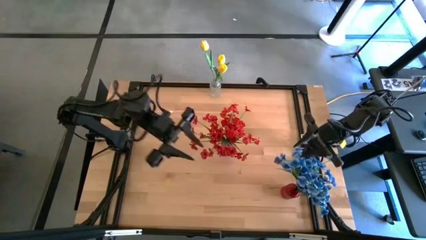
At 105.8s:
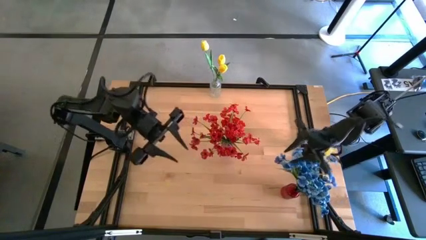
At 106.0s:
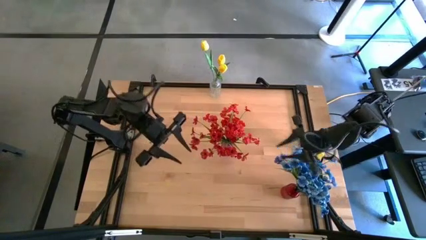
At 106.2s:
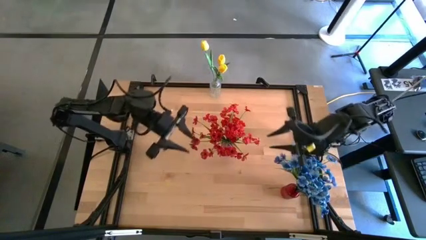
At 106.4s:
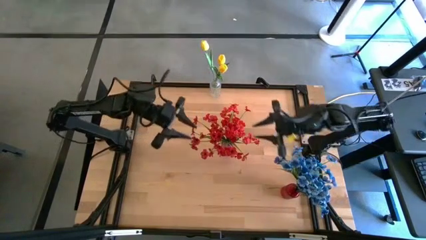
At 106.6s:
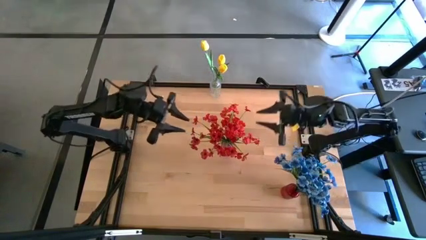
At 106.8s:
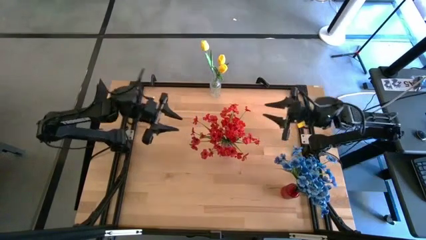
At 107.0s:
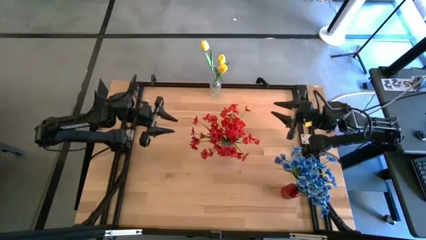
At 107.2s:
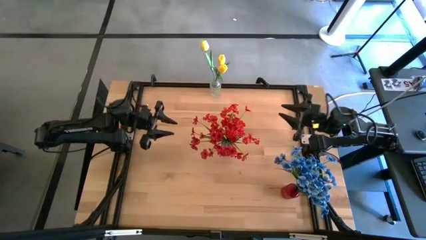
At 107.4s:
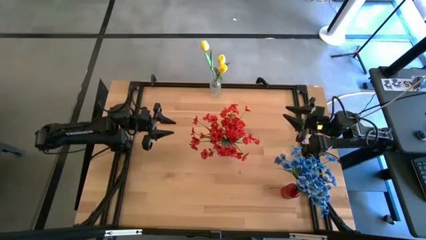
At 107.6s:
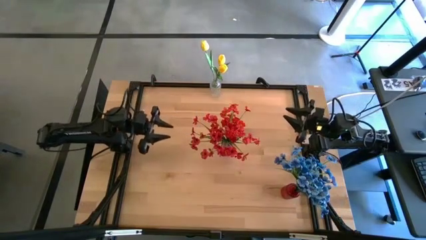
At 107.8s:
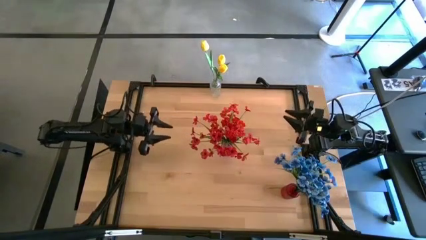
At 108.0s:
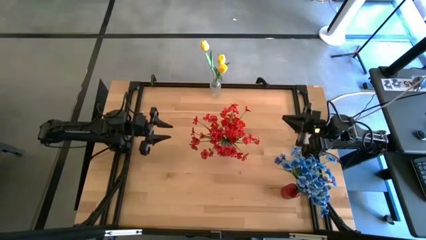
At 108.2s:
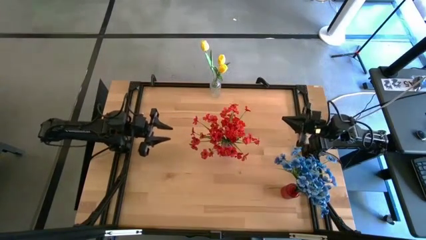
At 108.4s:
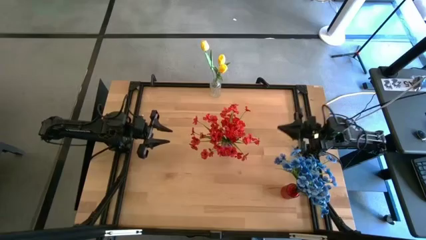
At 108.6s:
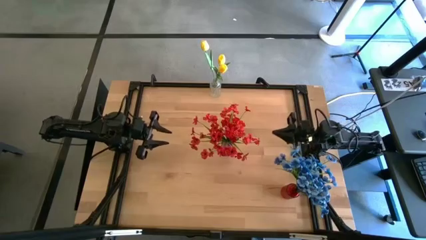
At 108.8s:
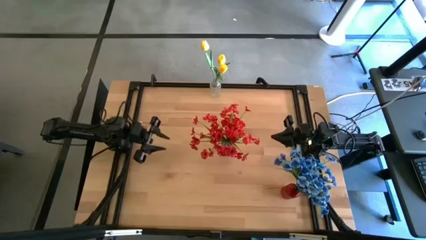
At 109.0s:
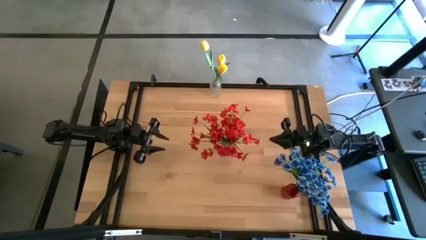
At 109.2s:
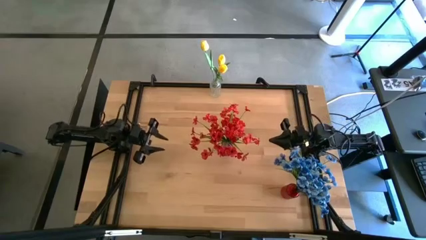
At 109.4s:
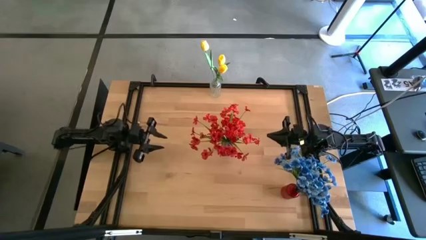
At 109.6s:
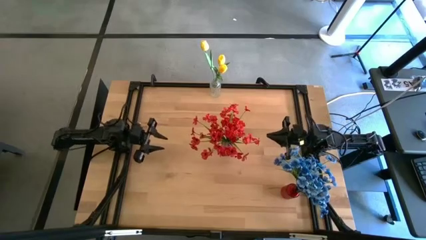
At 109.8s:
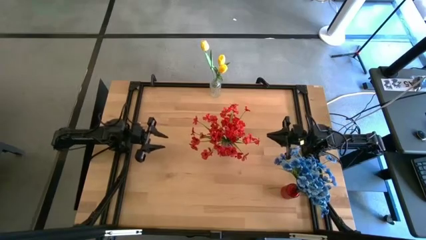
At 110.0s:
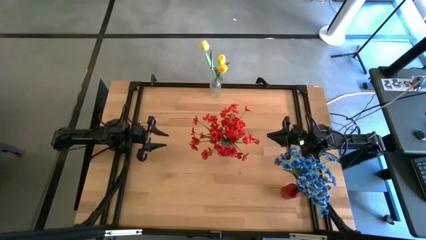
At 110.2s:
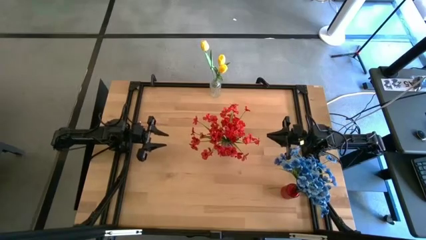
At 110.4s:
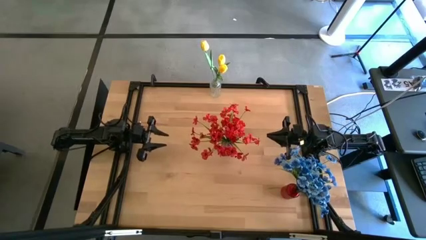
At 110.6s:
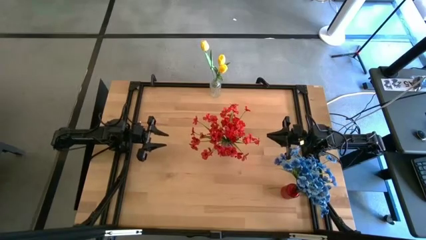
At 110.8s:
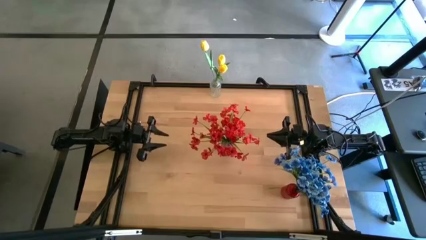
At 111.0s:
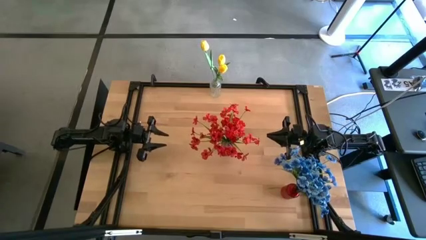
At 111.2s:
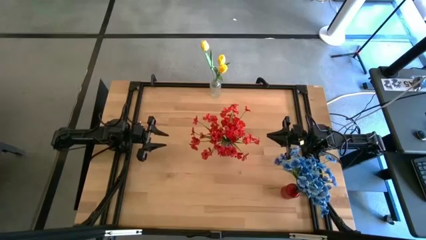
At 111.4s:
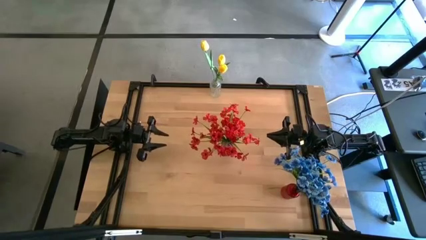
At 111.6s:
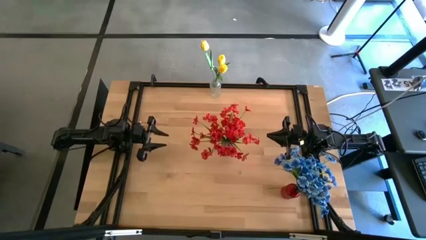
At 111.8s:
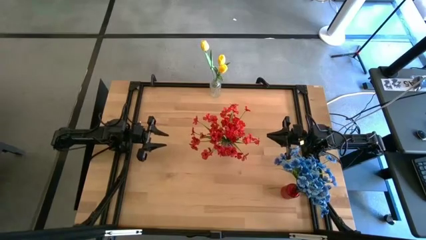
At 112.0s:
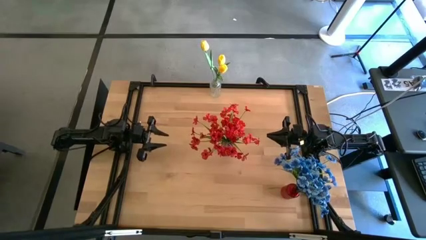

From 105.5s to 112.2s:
Task: Sort flowers into vase by color
Return to Home Position

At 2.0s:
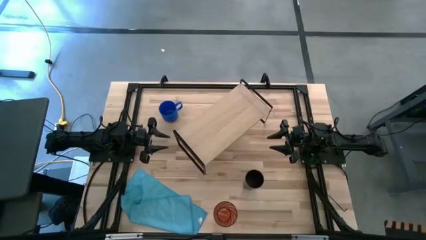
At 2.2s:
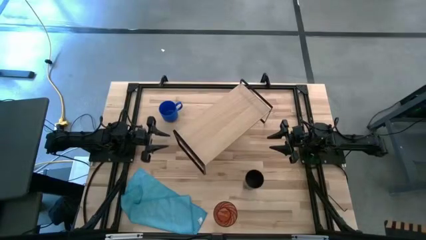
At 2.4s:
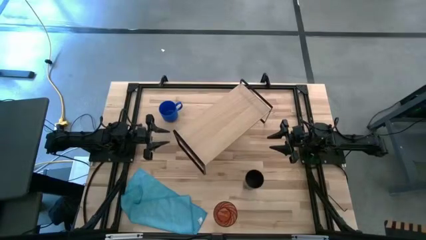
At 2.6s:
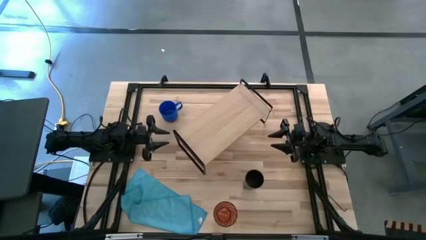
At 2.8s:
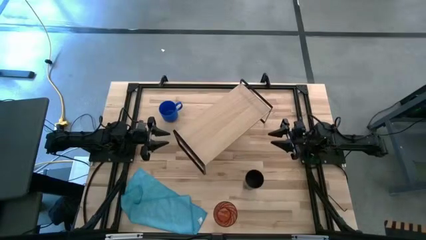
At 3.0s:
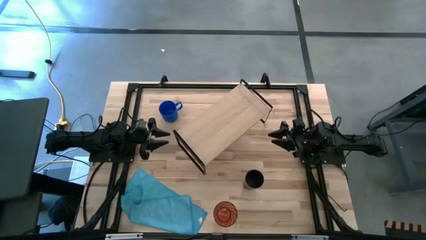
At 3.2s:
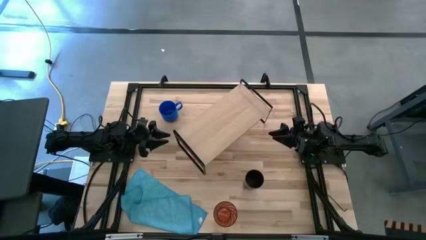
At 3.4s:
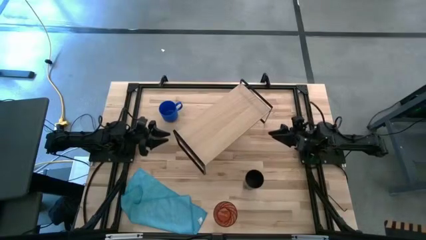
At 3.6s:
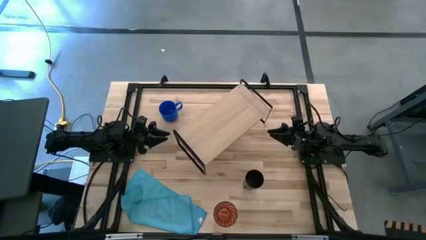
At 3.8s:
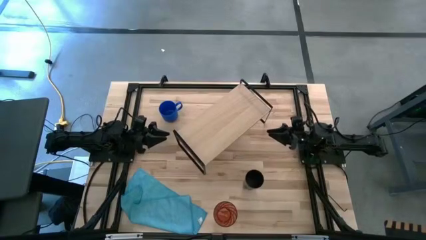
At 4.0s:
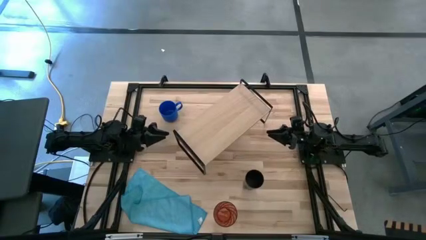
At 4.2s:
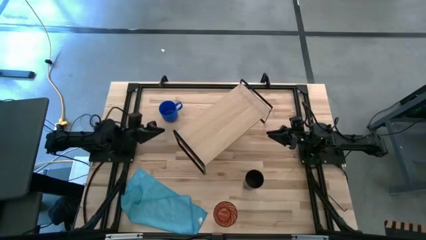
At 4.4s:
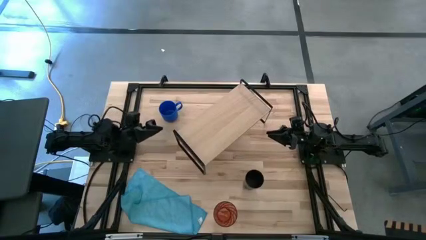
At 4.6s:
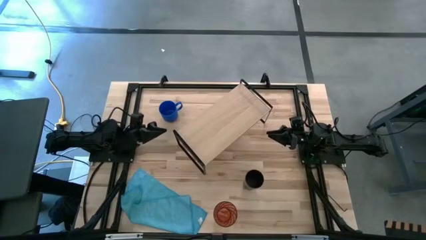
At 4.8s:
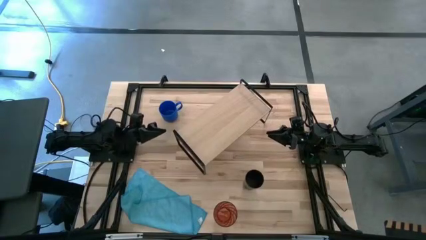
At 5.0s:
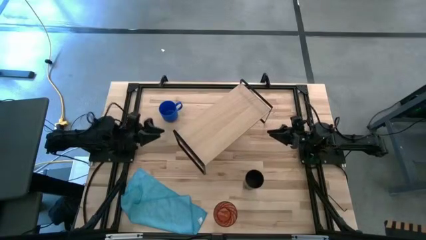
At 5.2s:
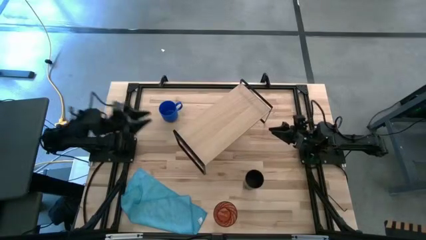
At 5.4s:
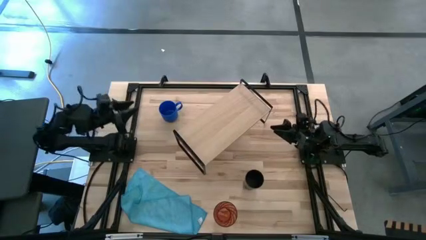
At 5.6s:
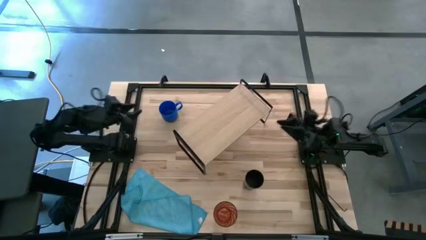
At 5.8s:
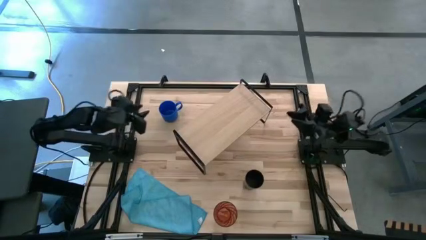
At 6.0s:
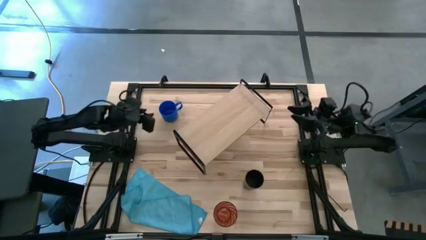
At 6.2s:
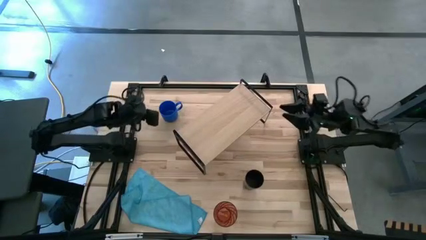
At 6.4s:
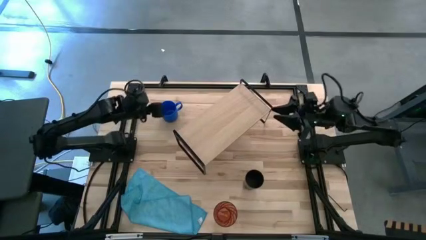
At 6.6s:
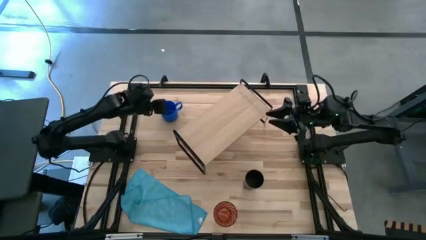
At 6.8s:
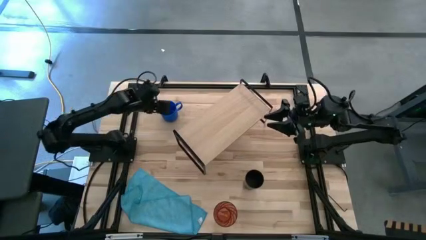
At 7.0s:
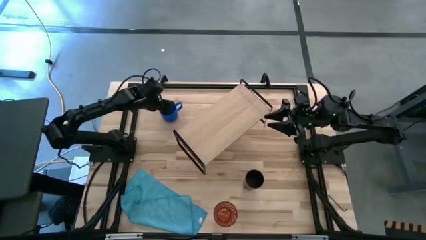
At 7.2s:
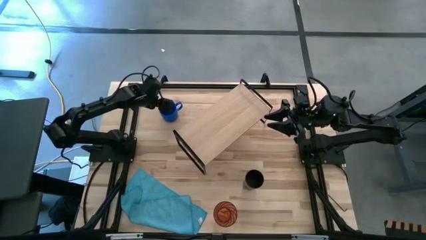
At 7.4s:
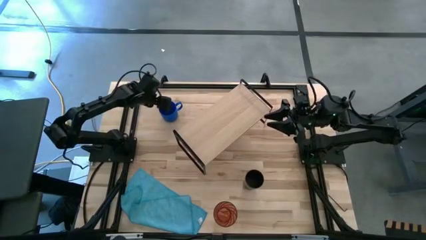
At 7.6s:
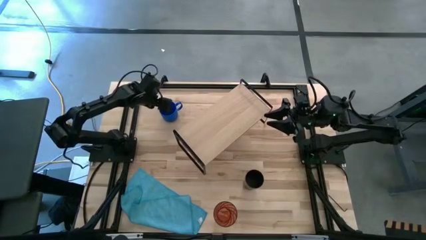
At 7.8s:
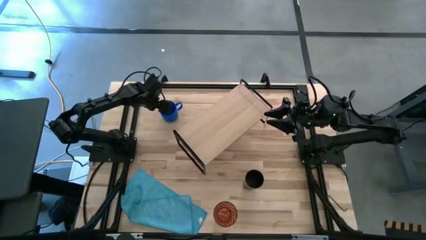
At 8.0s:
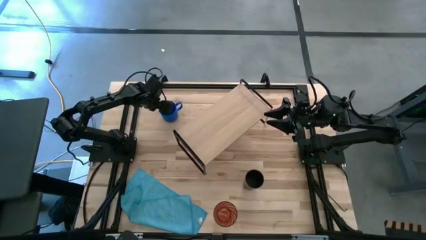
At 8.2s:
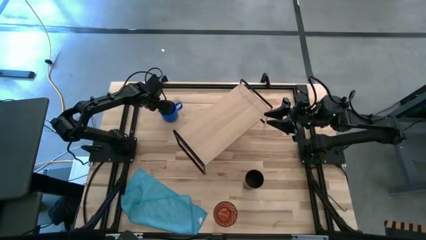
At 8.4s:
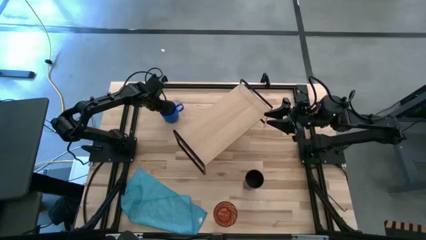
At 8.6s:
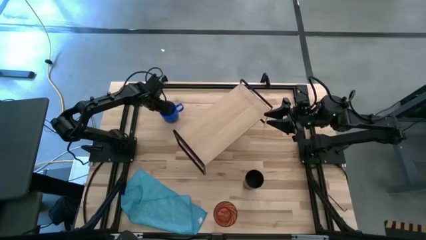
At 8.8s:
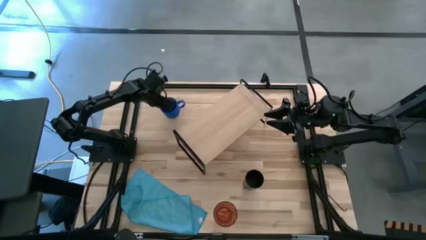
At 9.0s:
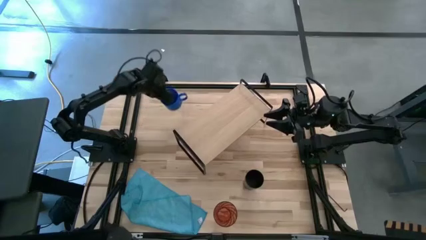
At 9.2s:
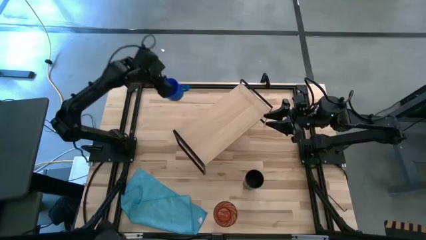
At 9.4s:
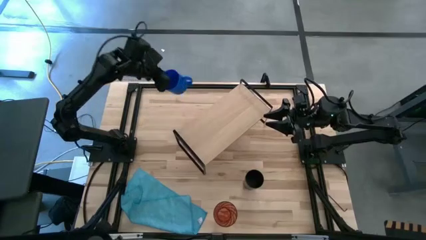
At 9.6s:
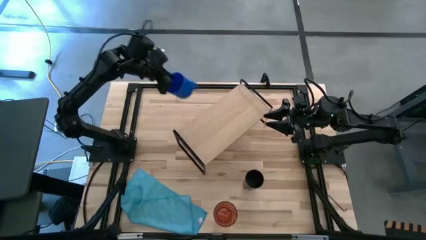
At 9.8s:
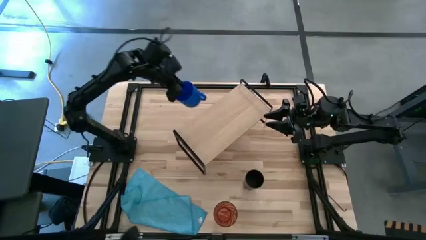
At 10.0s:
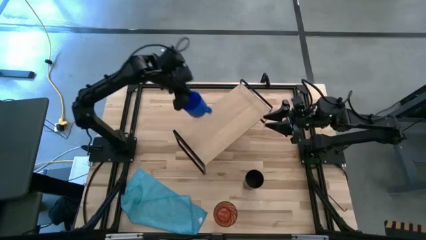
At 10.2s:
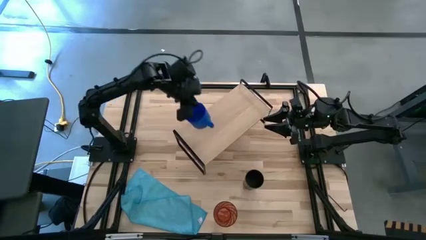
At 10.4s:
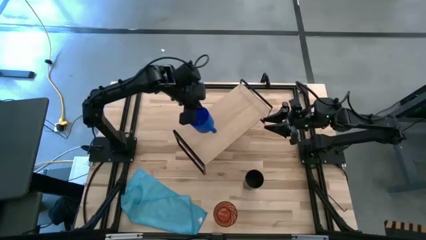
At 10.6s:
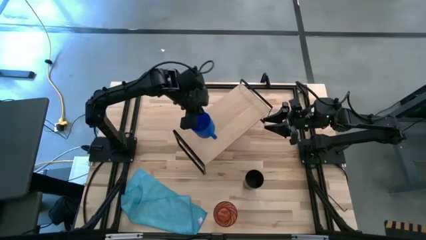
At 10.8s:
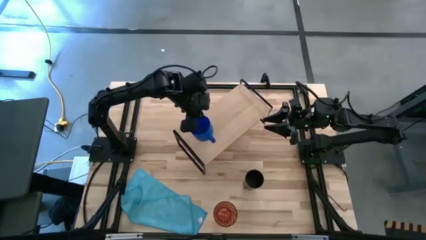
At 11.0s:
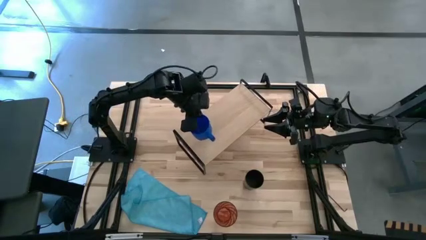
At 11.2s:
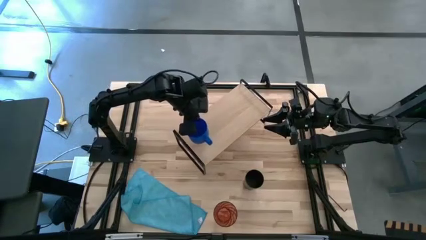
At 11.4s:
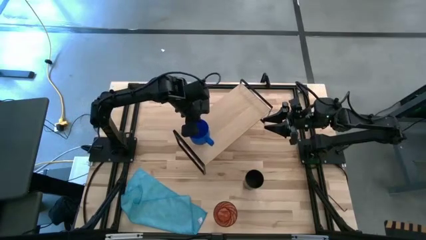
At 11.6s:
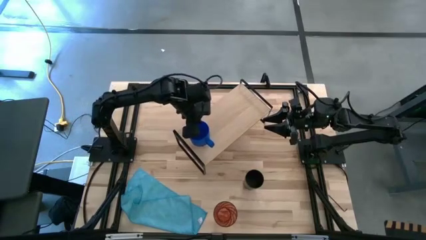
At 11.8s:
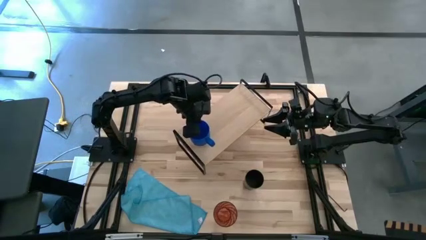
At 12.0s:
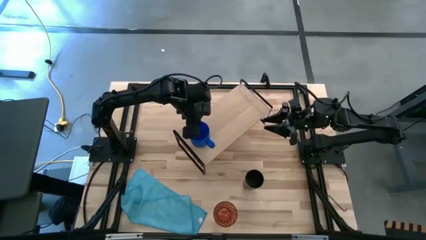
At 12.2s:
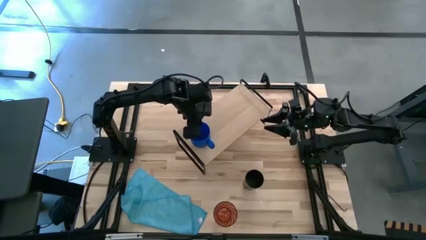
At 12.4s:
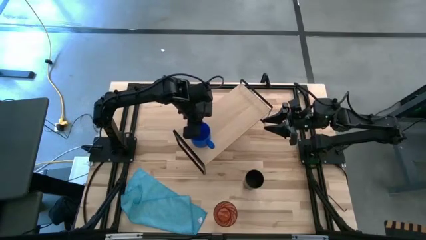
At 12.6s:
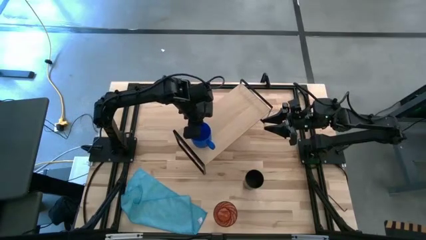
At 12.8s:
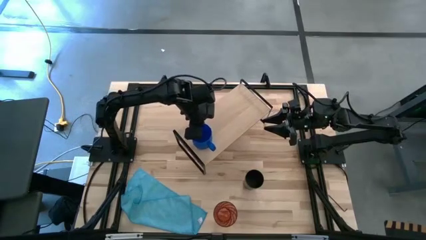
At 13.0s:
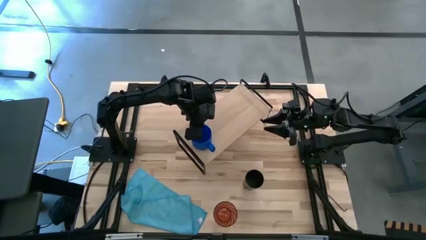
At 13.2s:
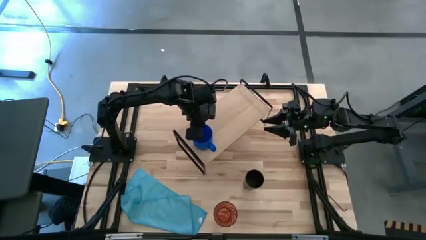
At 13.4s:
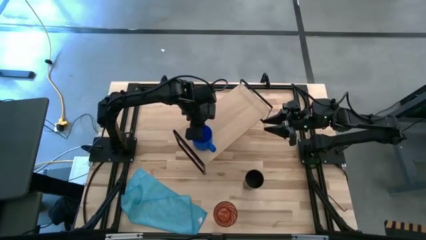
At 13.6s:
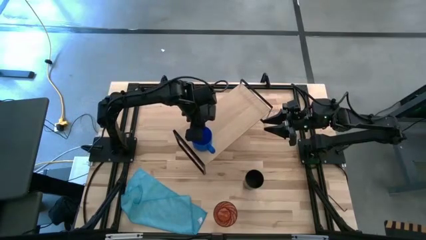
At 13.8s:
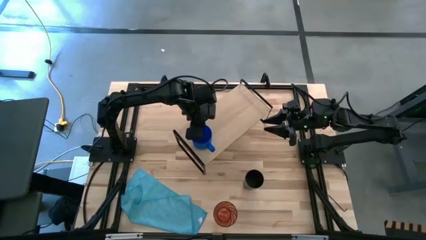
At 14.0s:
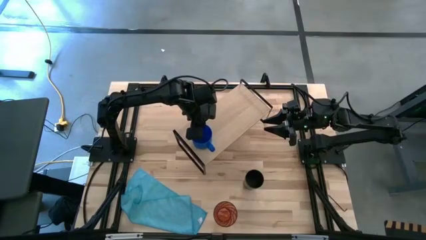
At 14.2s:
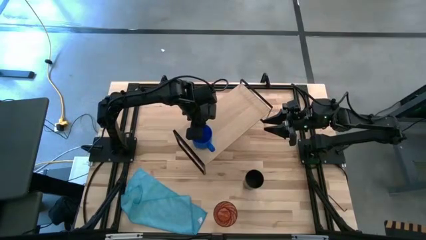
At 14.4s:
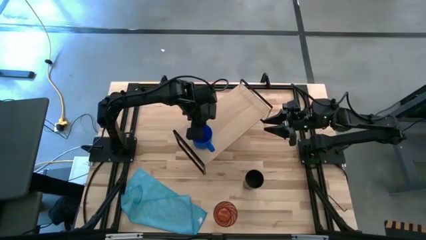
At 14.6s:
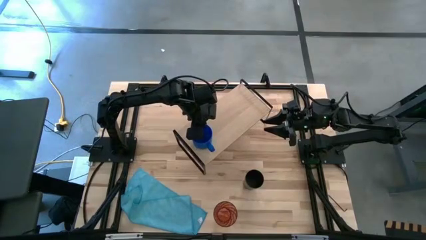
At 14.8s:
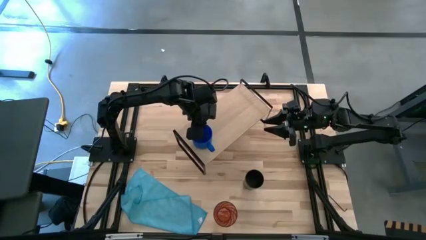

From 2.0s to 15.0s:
Task: Stack small to large cups/mugs on shelf
Put the blue mug on the shelf
